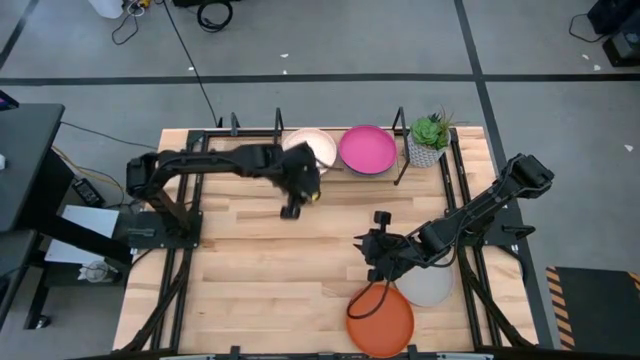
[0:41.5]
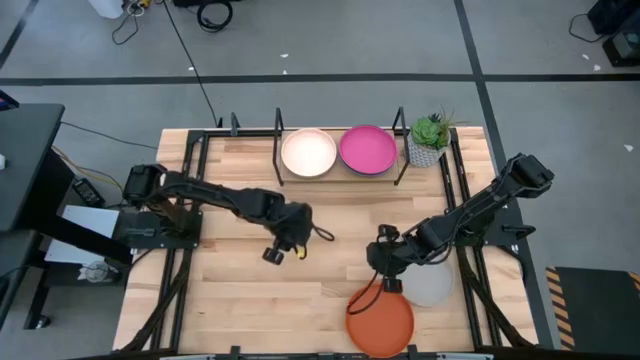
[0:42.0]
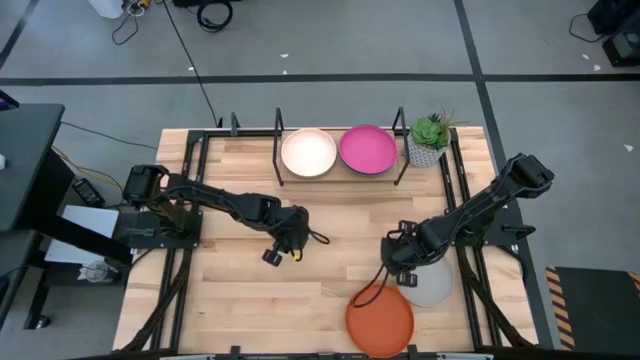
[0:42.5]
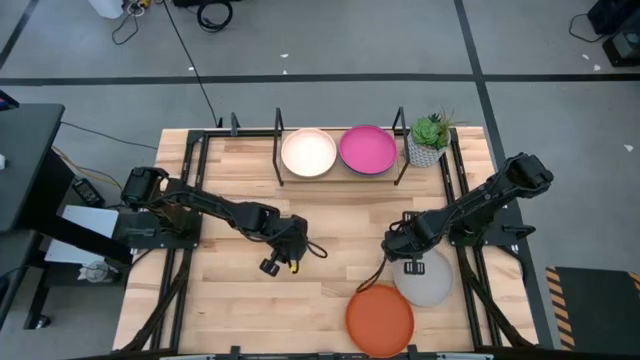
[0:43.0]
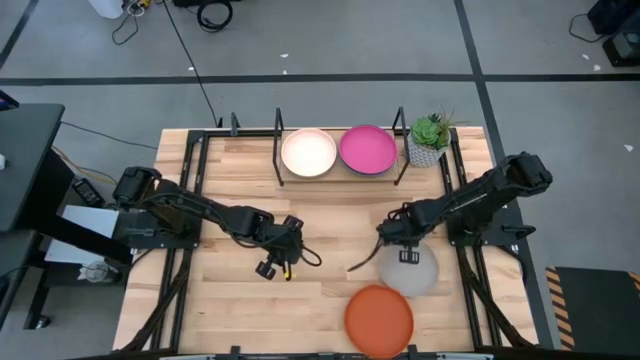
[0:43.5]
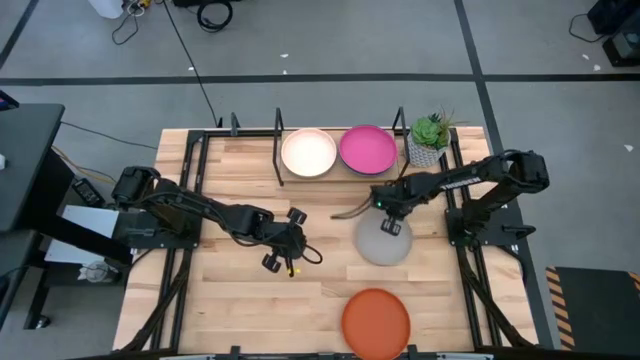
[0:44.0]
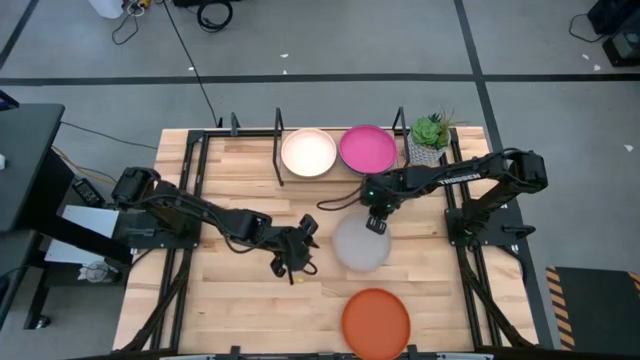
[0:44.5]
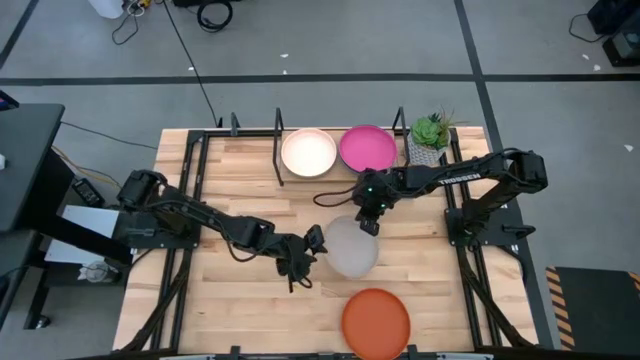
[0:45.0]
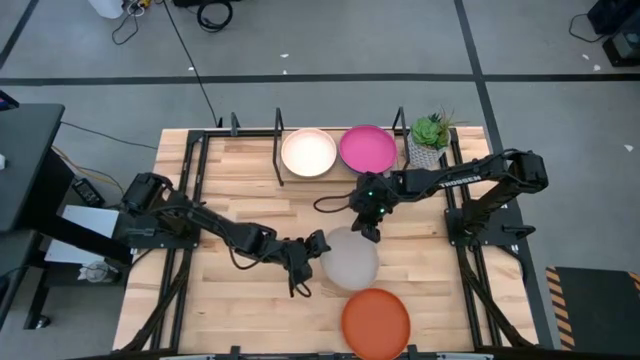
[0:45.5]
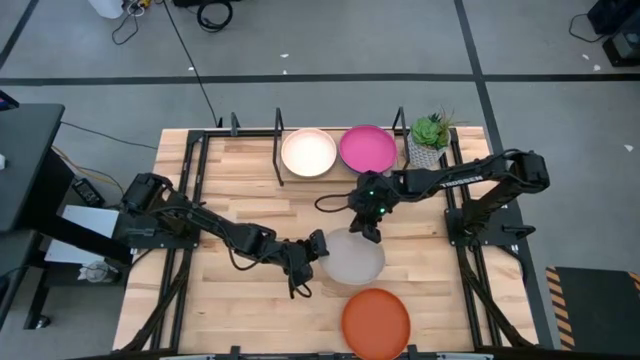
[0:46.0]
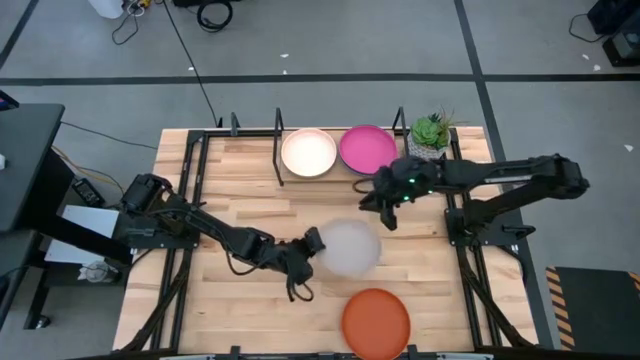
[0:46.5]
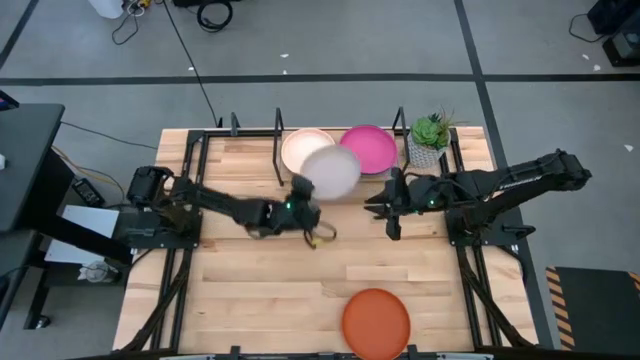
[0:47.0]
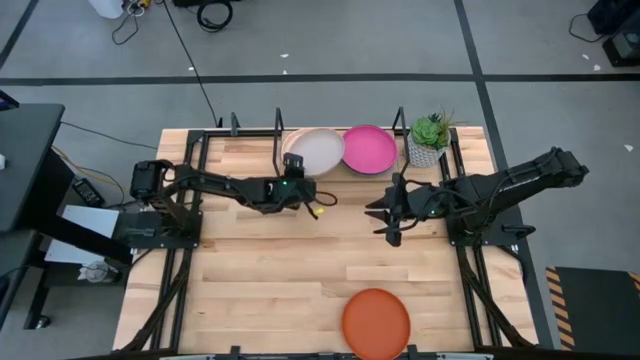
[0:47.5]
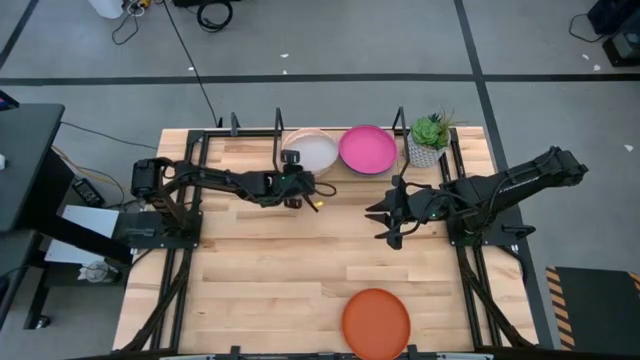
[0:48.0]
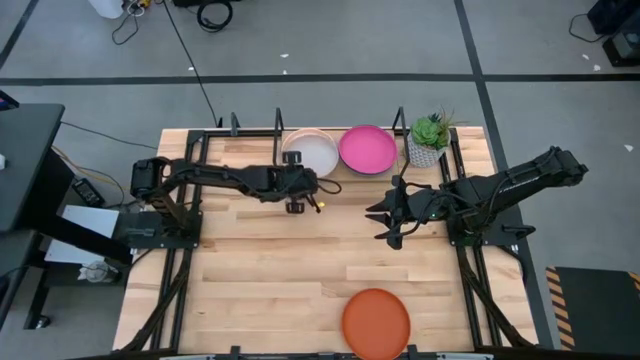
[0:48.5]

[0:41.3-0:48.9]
Task: Place and stack plates onto a shelf
Stack the gray plate on top of the white plate on the shelf

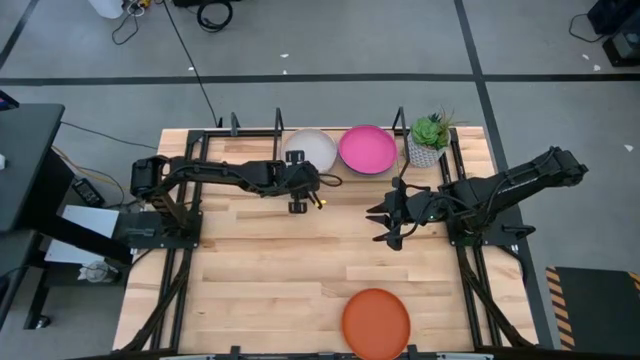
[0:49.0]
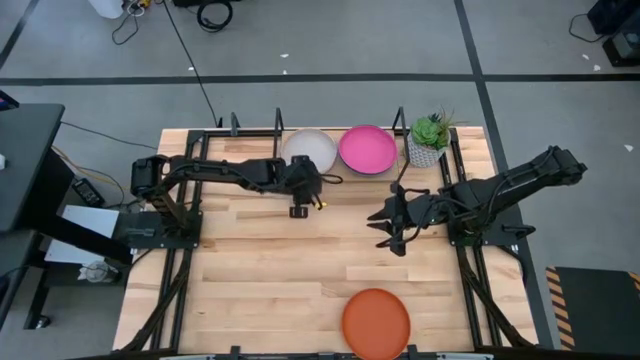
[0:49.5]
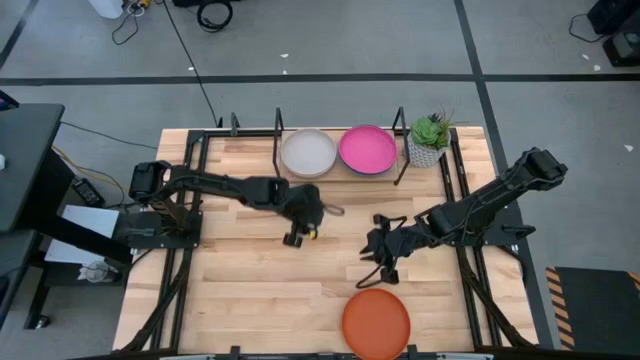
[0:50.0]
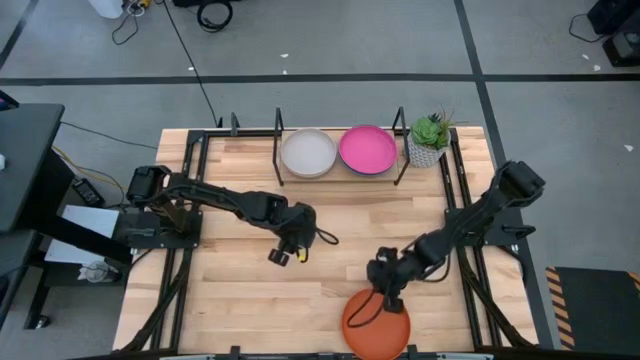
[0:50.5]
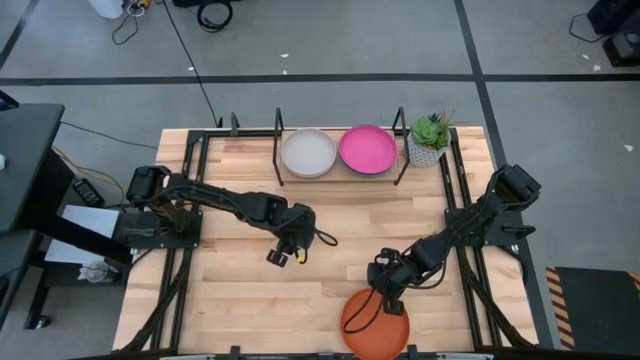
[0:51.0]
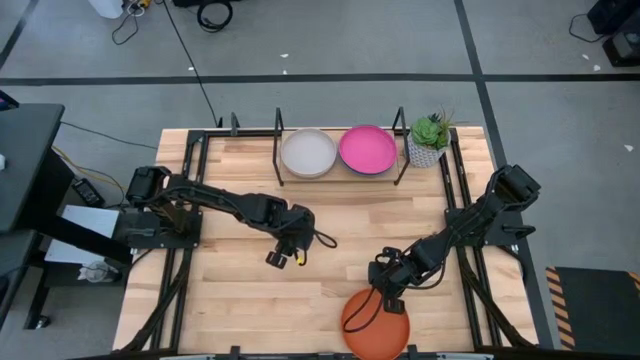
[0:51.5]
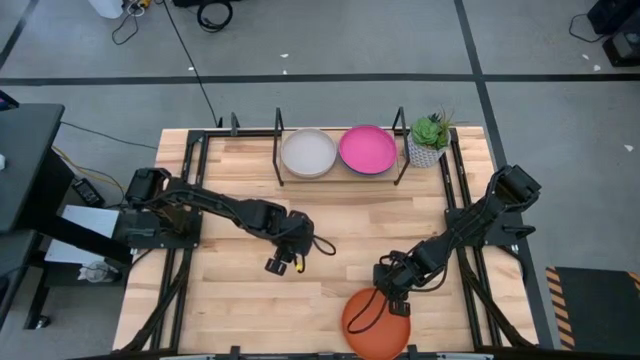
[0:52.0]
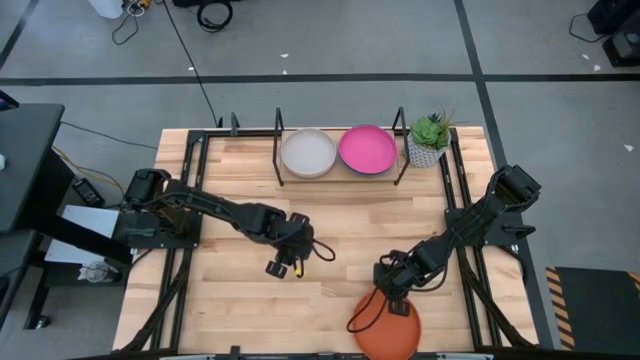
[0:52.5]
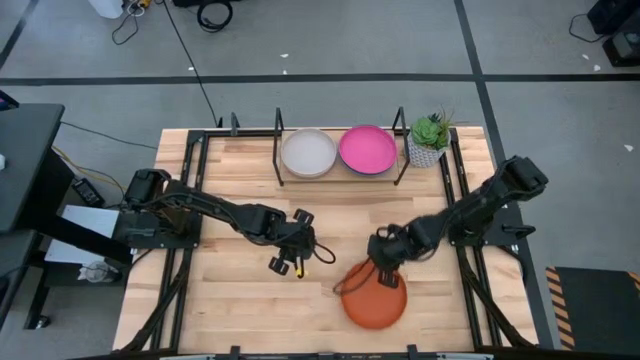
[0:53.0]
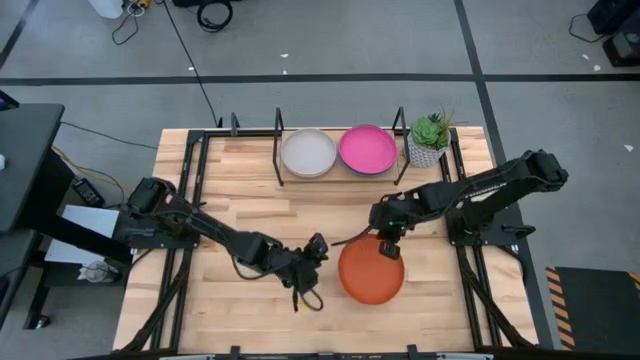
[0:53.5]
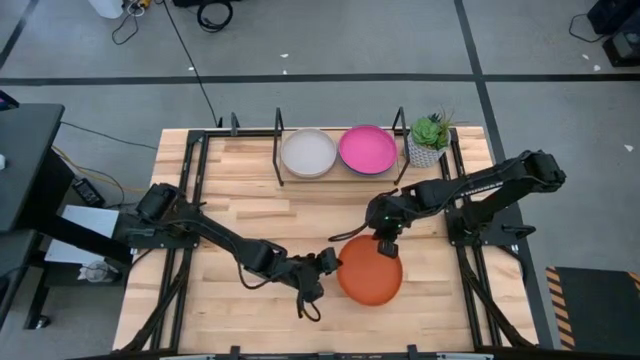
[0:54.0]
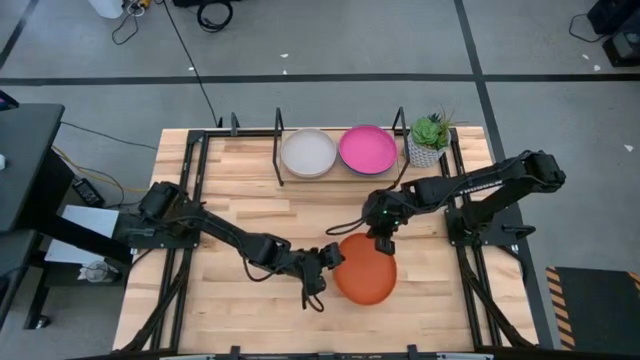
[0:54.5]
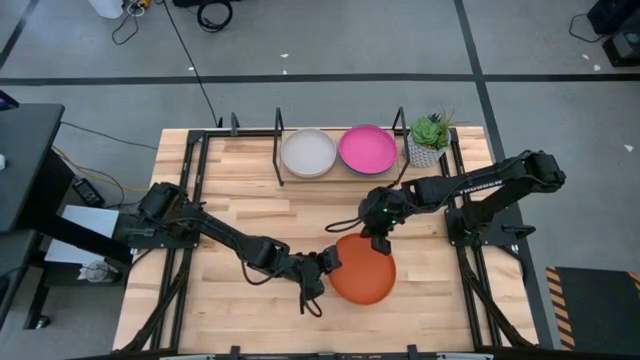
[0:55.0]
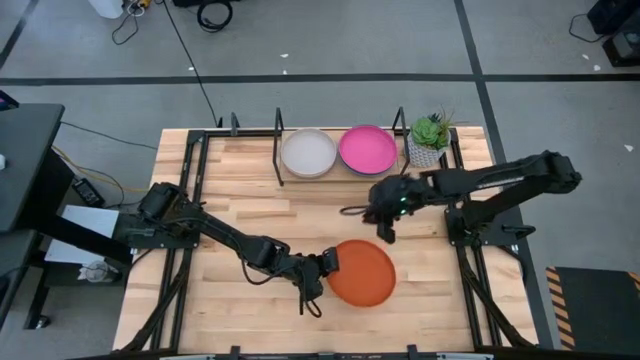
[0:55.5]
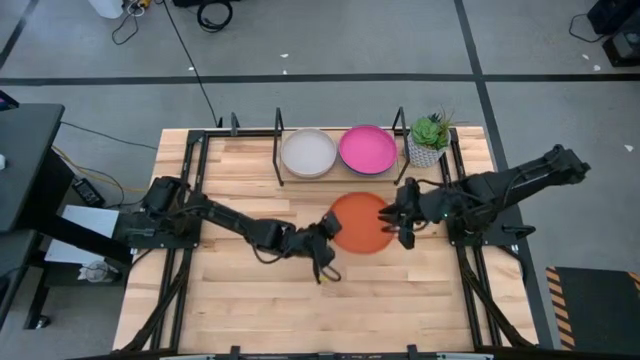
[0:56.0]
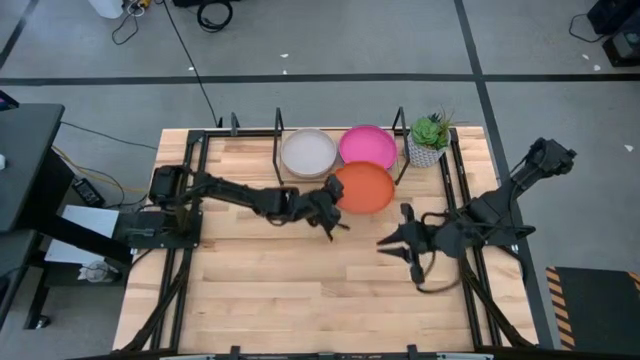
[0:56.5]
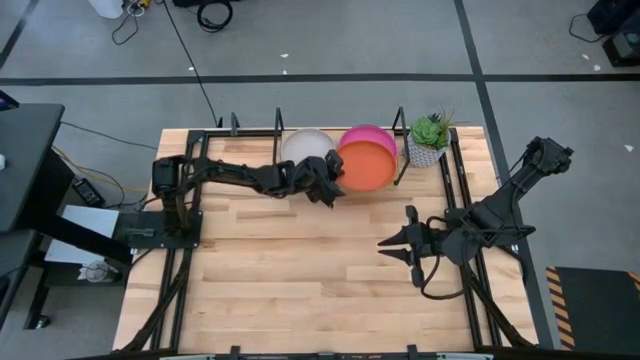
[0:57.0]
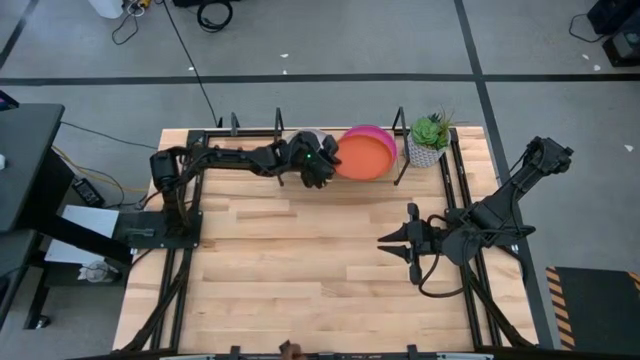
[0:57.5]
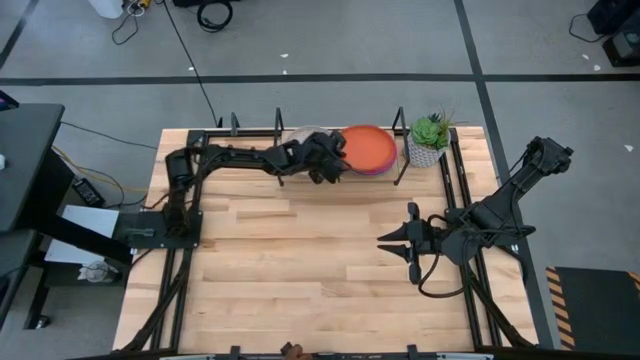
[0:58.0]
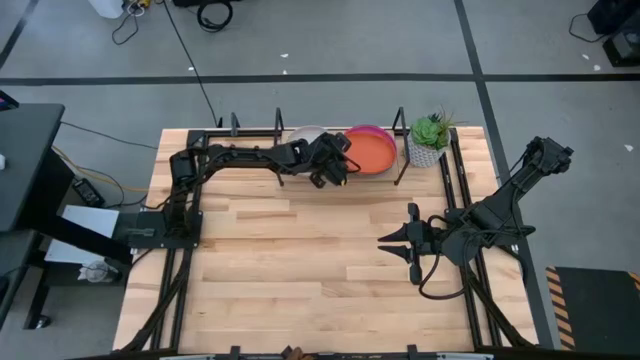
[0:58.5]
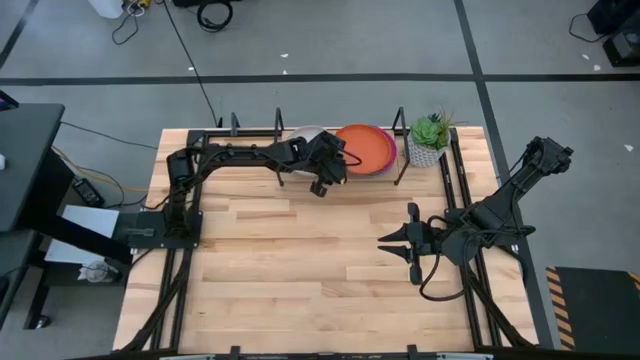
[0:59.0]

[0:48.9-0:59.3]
Stack the orange plate on top of the pink plate on the shelf

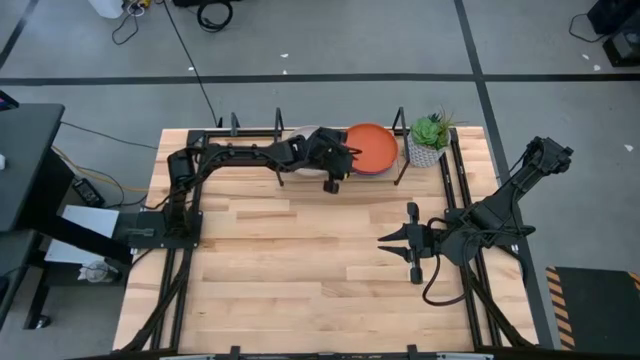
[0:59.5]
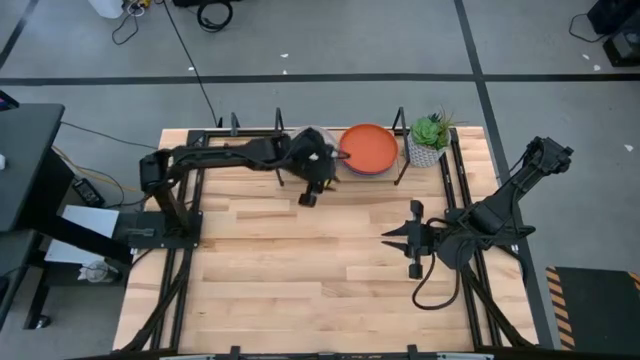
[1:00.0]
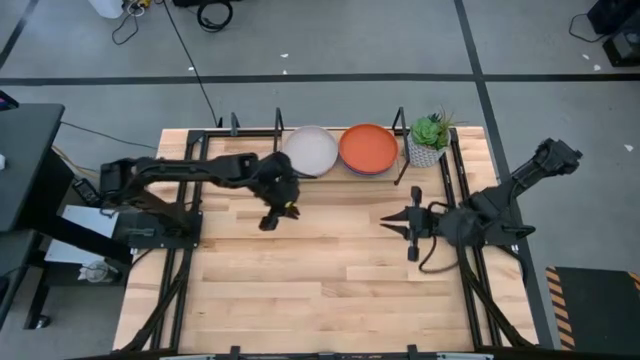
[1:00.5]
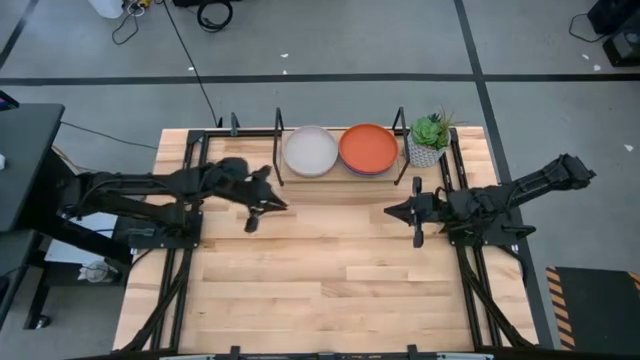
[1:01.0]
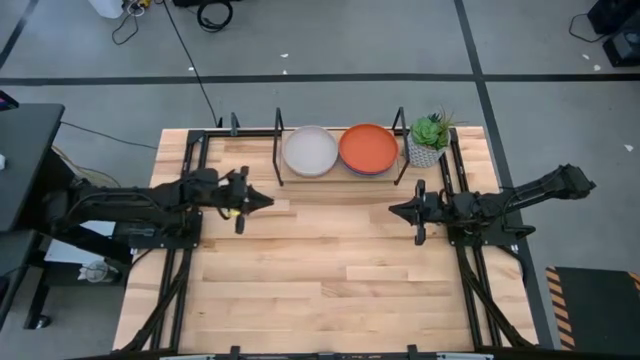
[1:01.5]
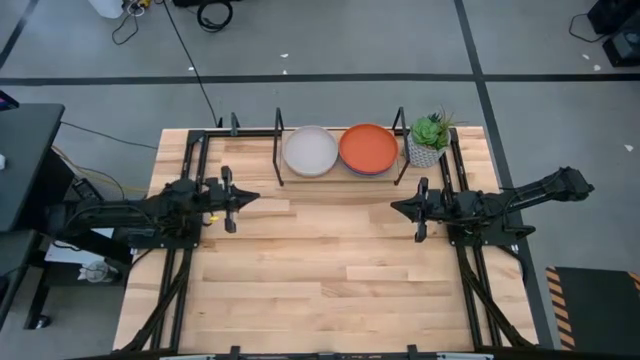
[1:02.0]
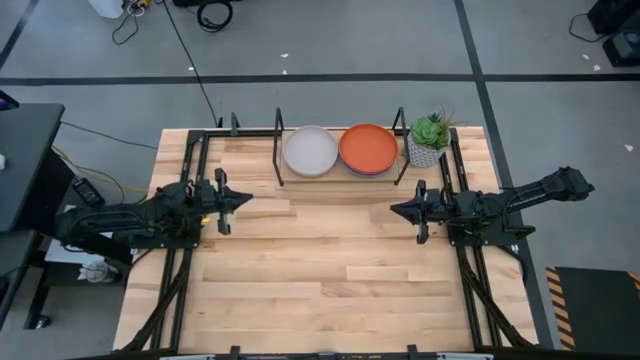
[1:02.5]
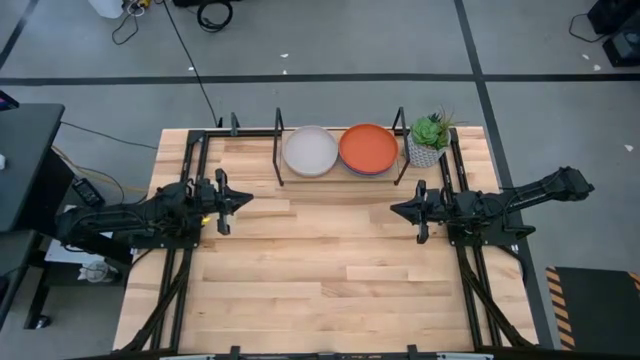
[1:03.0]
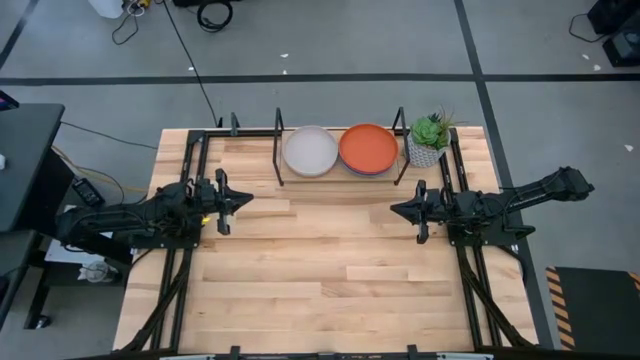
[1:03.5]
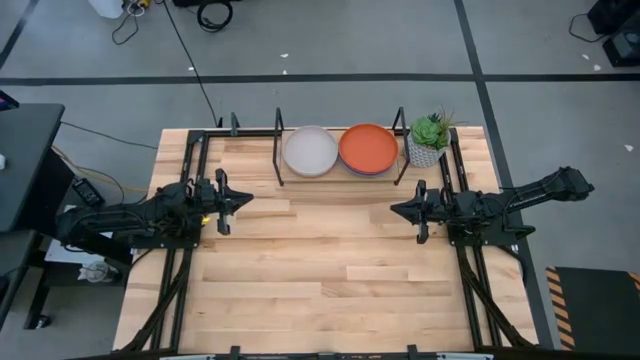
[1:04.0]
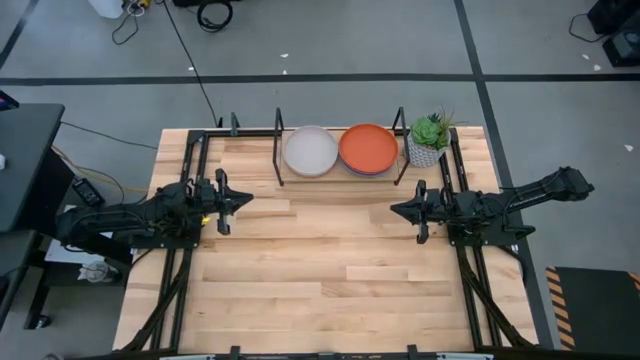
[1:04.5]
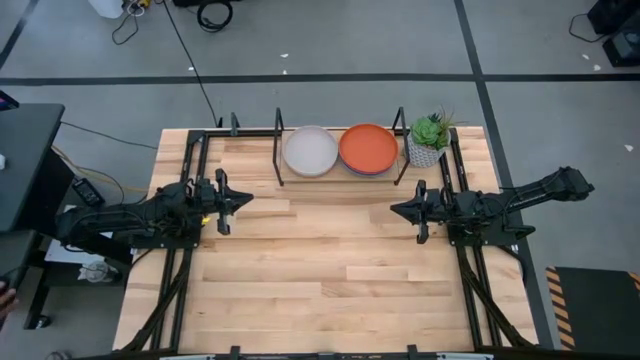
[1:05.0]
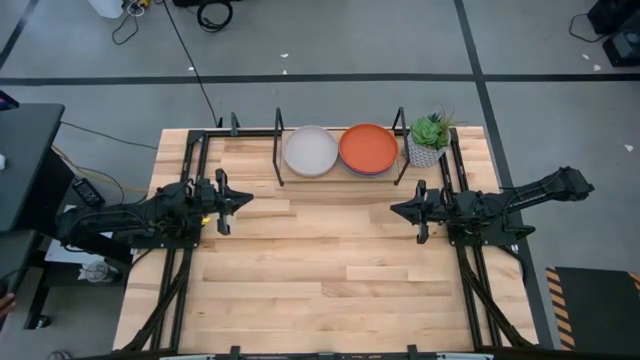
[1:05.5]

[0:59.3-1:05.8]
Return to Home Position
